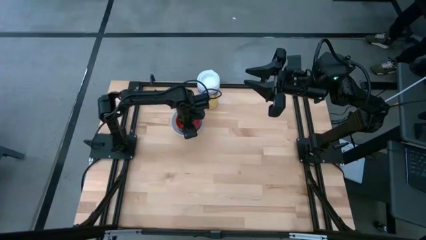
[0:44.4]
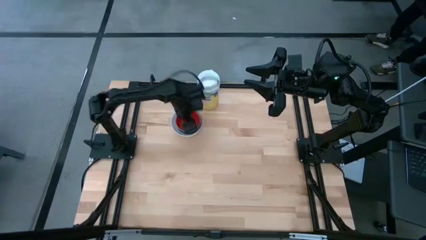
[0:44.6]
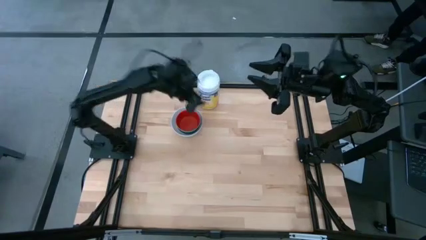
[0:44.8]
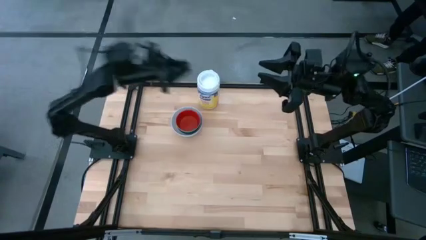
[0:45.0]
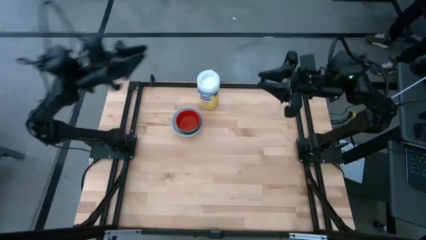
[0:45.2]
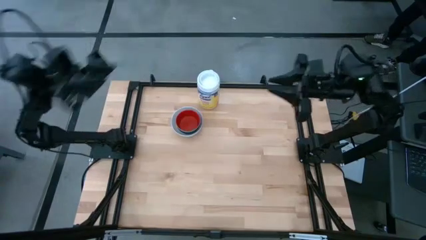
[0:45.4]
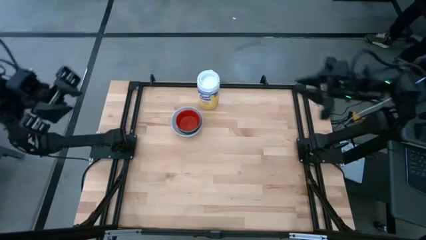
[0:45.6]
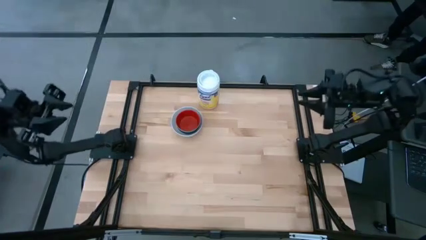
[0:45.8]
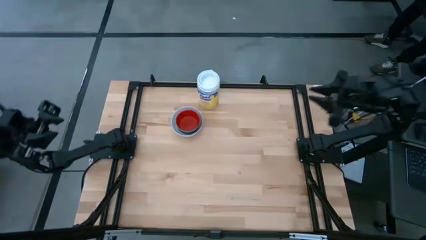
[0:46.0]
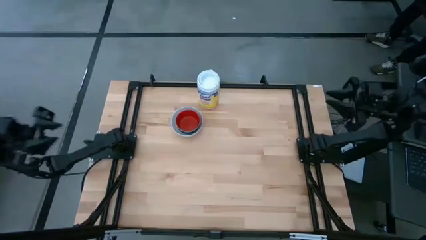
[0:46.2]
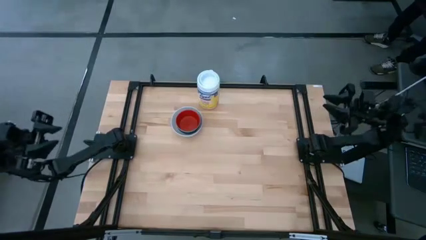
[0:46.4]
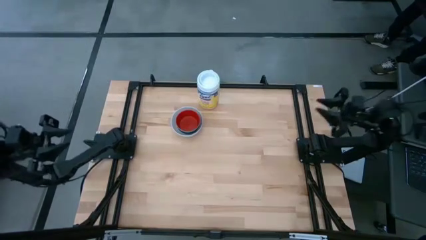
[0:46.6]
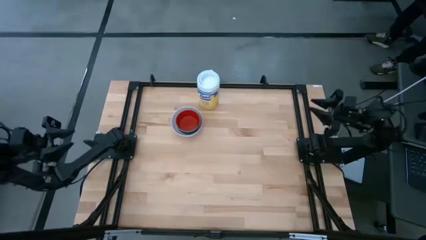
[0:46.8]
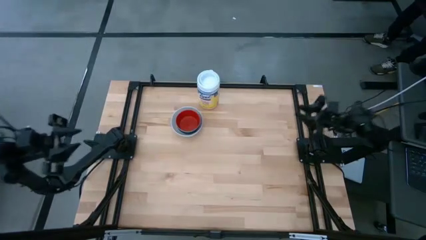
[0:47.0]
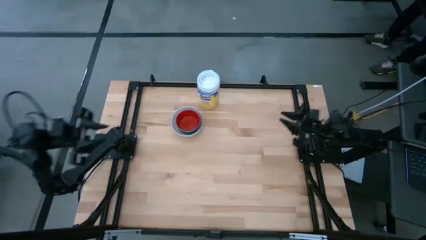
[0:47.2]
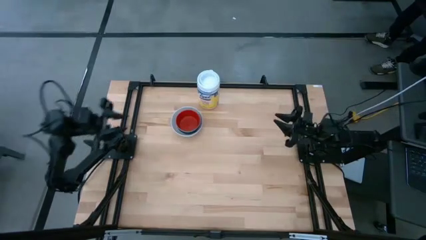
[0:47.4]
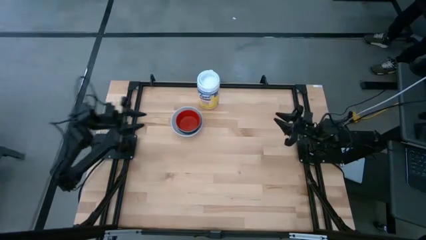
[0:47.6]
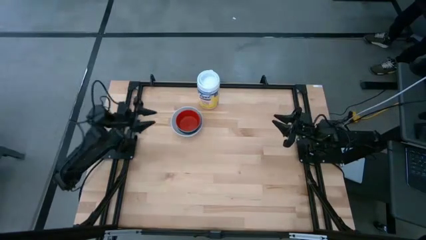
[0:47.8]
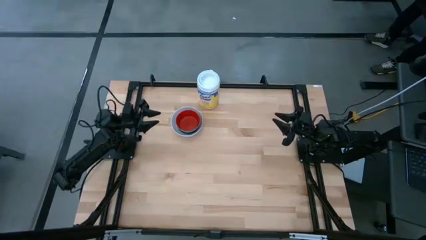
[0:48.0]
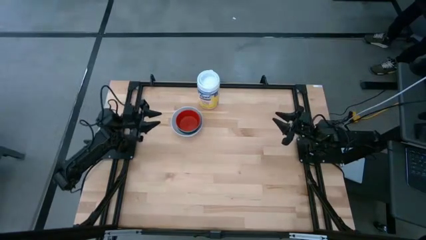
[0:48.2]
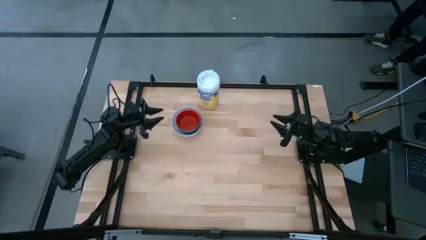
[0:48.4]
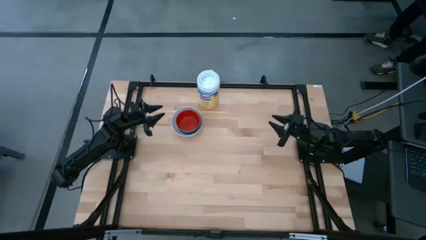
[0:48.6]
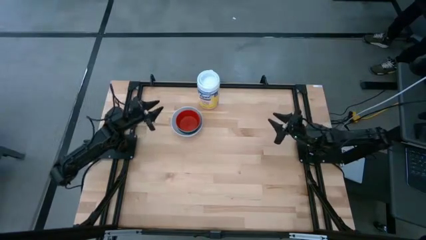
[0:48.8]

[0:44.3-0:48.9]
Return to Home Position

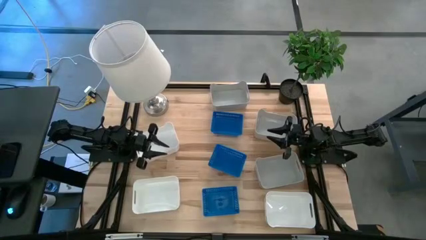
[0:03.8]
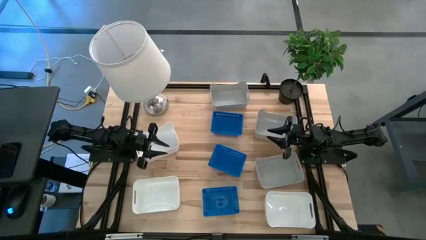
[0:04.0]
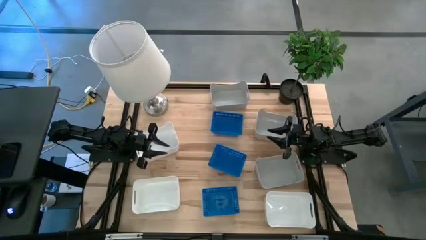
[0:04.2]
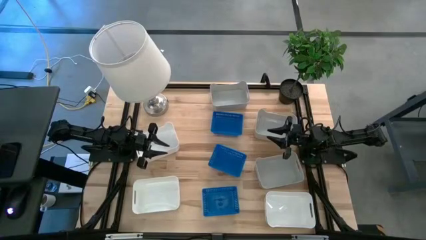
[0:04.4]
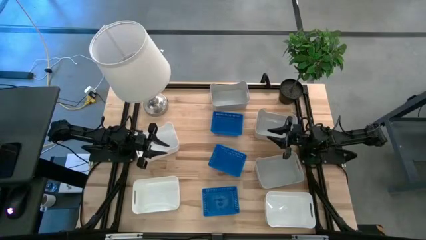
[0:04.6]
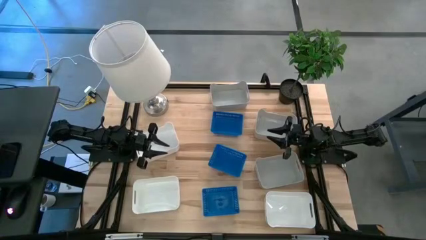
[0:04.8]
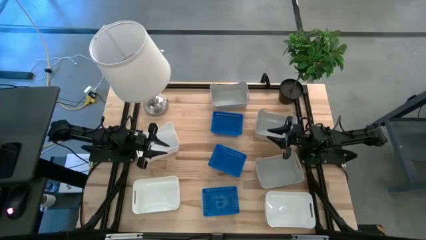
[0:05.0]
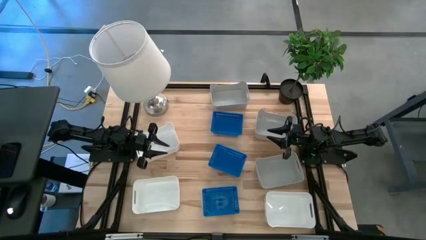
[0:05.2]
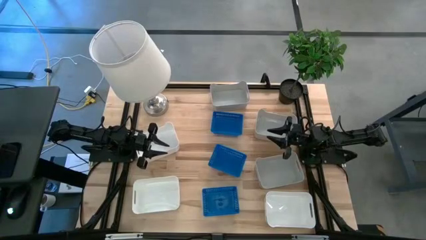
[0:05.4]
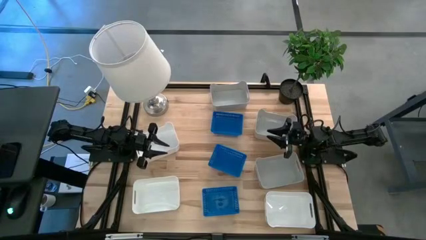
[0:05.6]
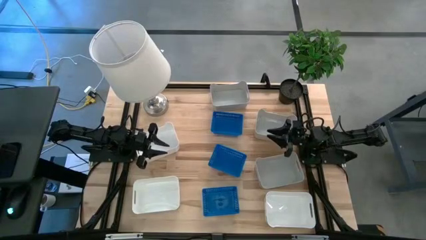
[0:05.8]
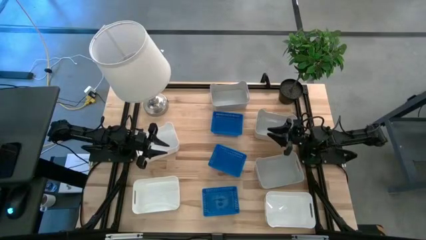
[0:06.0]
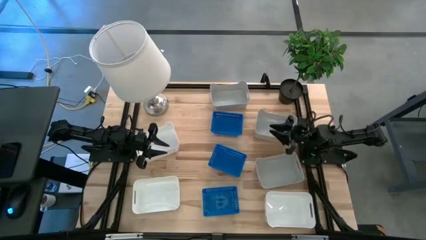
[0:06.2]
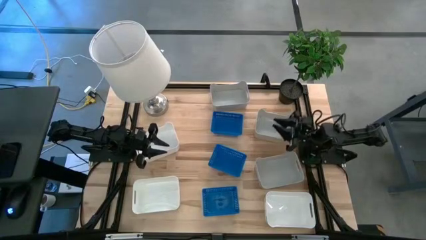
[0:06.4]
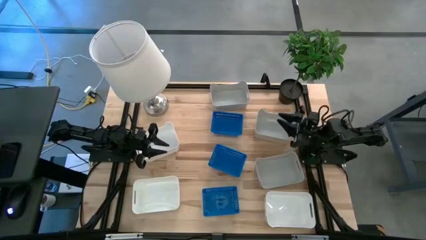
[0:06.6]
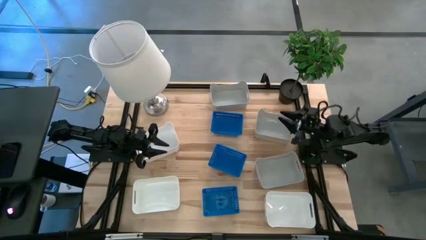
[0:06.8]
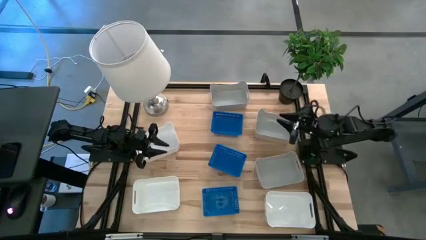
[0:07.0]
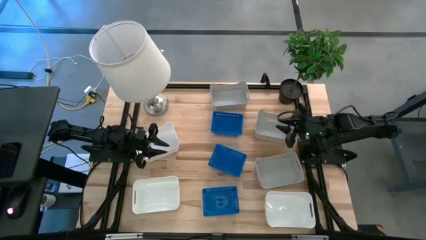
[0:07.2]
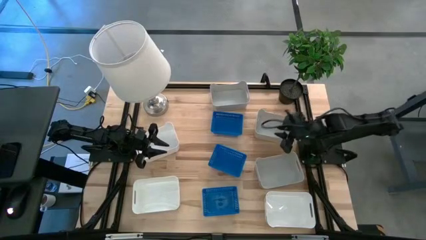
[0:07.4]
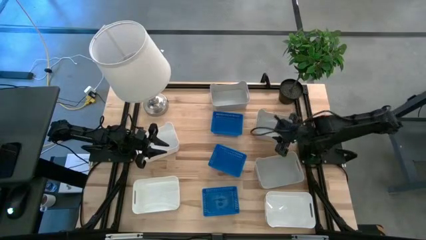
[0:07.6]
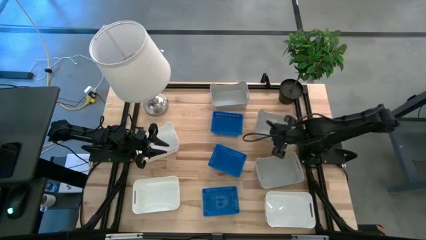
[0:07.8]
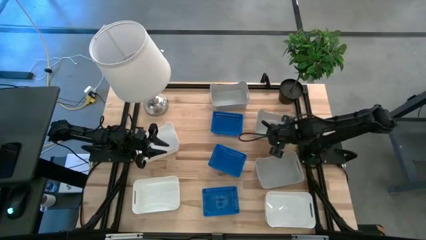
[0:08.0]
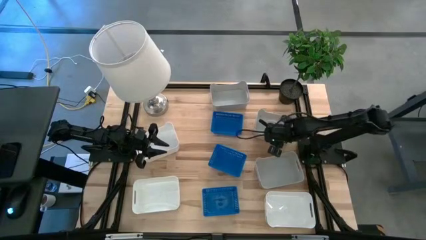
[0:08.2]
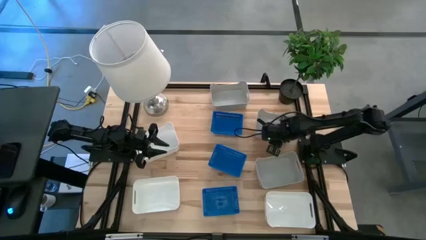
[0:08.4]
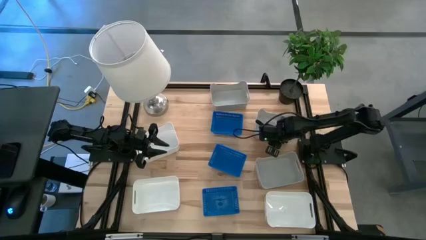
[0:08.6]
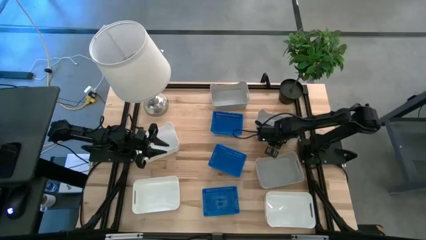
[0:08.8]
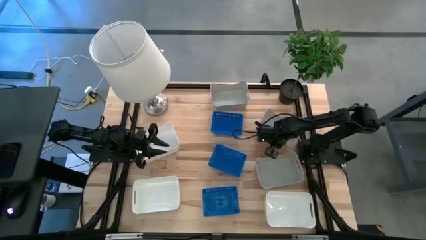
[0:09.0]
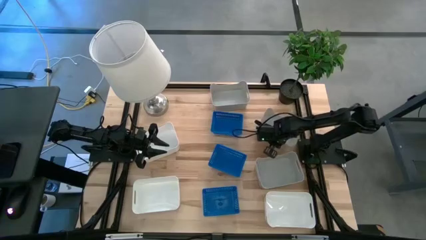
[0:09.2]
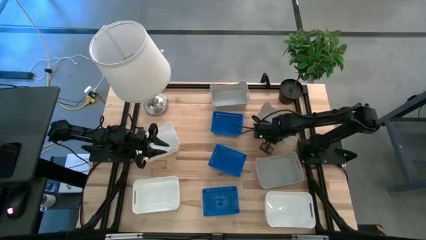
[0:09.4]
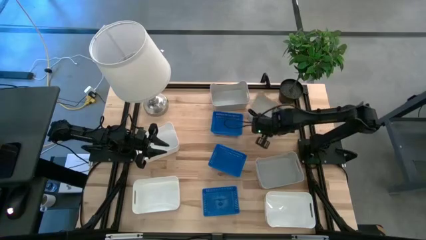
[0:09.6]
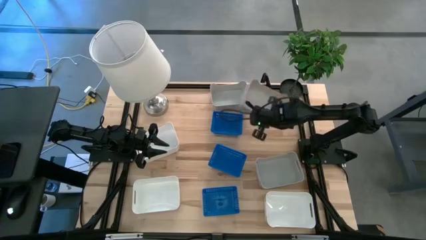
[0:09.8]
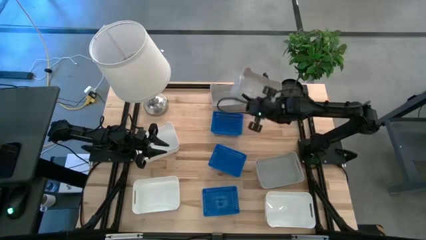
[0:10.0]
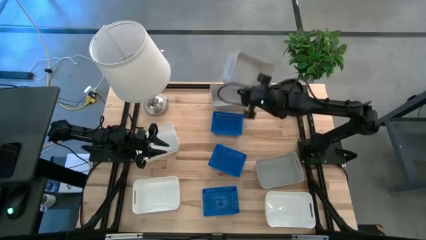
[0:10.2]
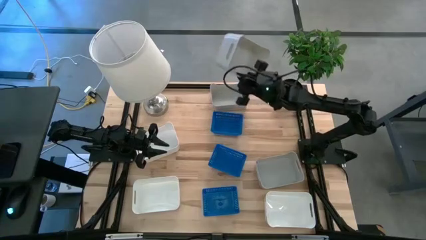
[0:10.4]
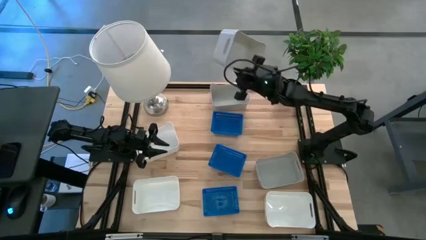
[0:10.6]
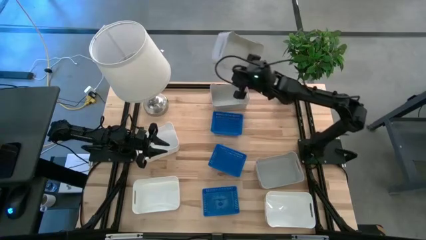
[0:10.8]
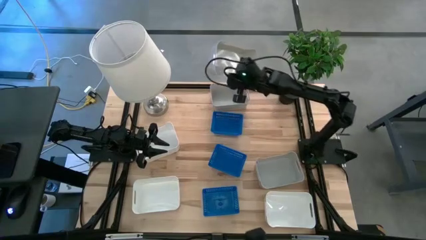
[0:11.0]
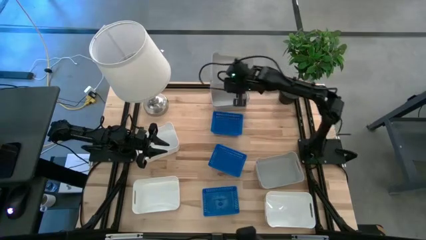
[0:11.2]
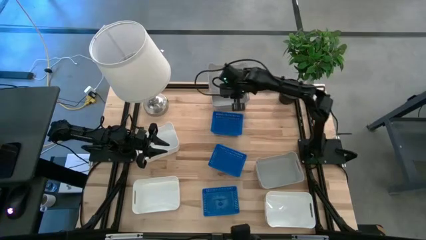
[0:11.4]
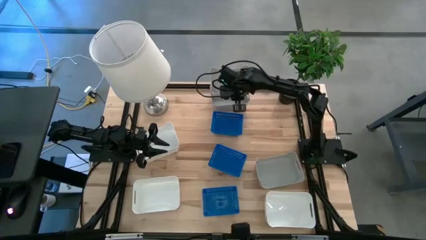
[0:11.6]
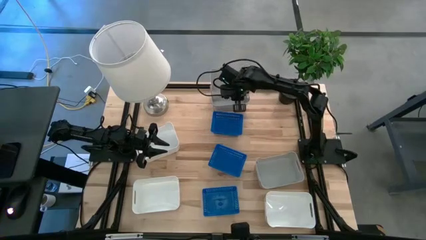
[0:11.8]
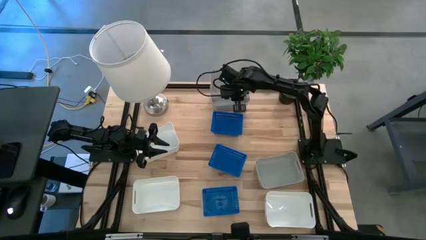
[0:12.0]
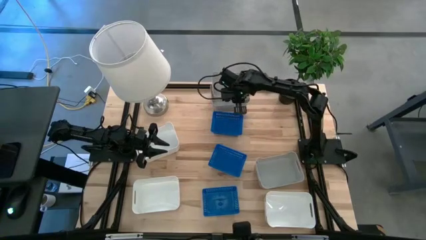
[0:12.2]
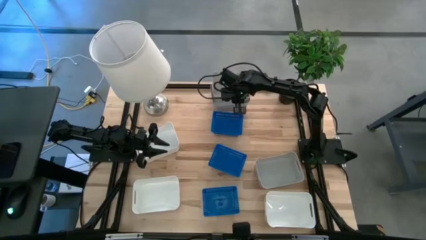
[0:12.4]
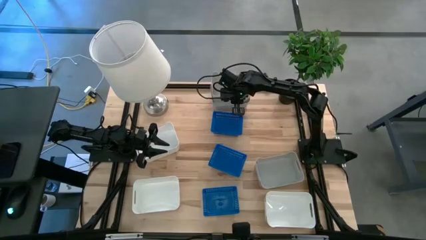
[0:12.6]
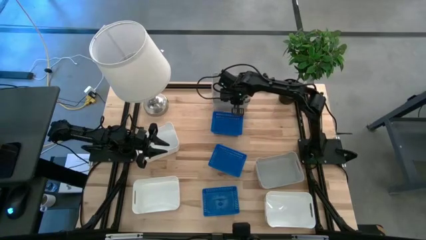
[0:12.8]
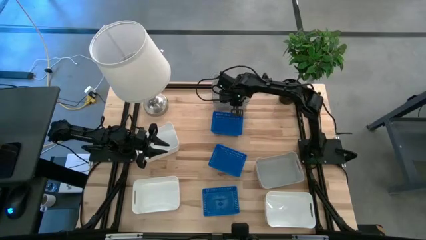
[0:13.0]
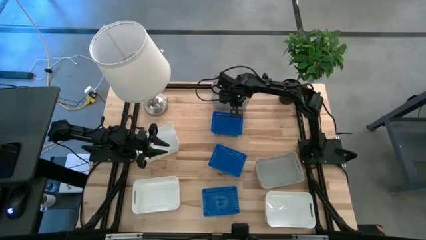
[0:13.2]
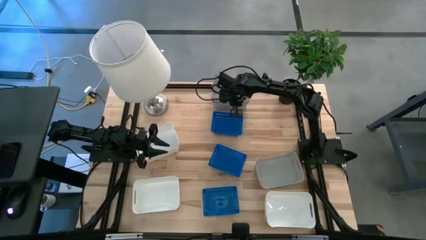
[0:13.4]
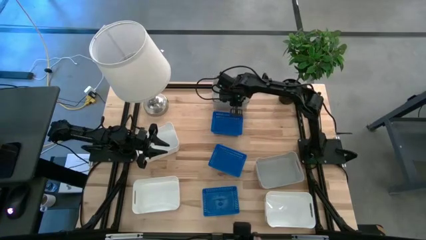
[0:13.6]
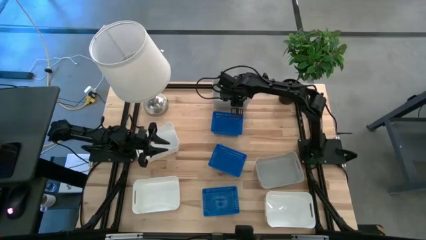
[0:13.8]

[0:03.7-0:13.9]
Stack the middle right gray bin on the top gray bin
